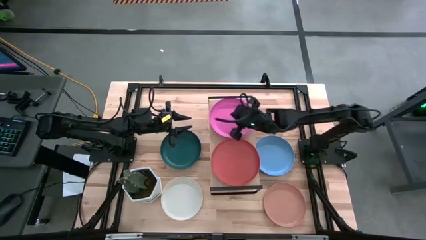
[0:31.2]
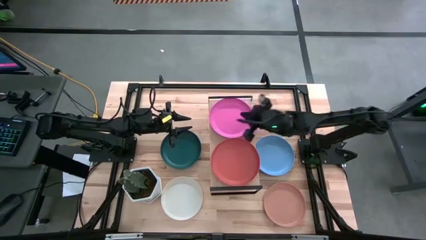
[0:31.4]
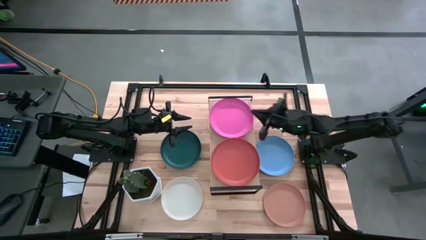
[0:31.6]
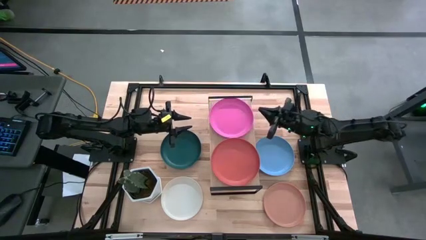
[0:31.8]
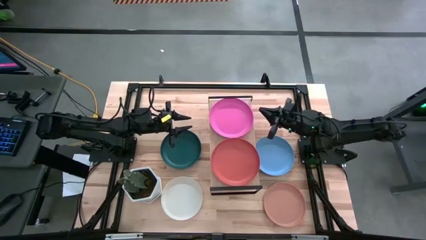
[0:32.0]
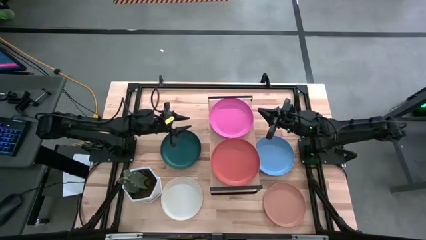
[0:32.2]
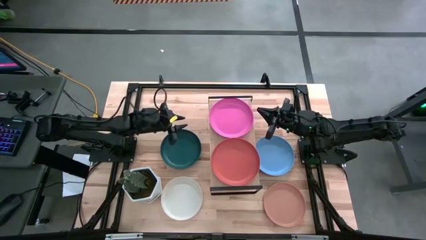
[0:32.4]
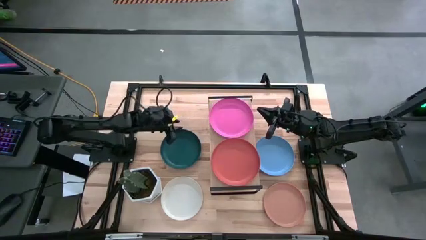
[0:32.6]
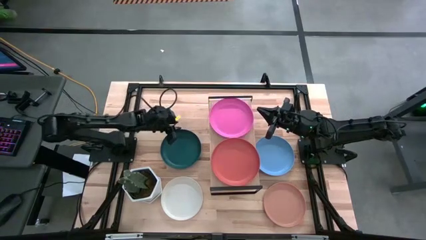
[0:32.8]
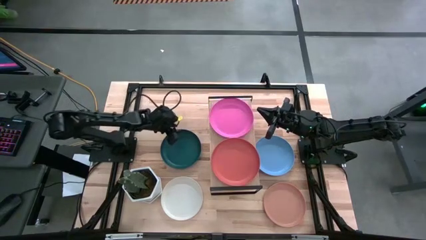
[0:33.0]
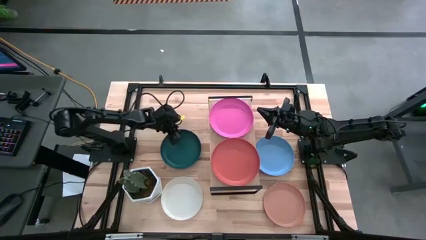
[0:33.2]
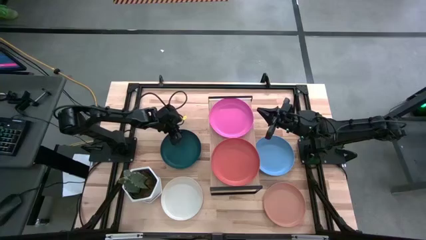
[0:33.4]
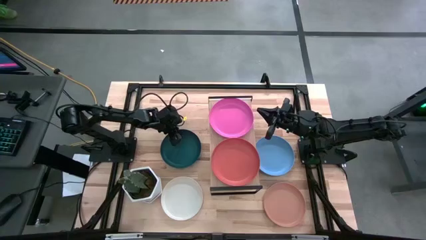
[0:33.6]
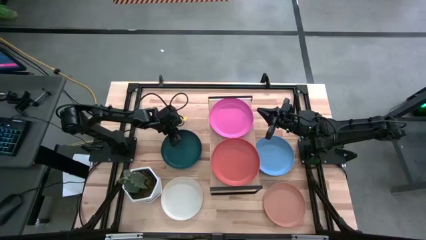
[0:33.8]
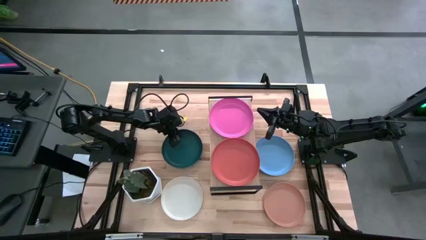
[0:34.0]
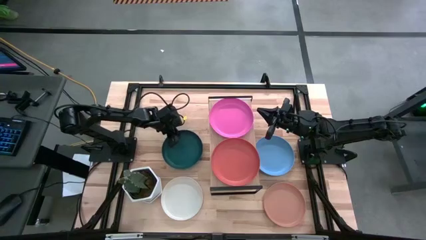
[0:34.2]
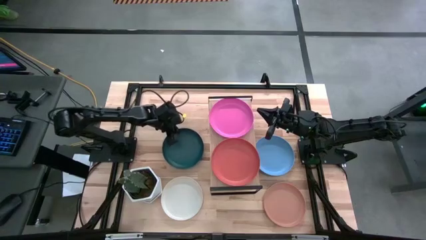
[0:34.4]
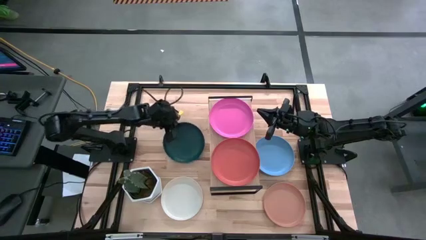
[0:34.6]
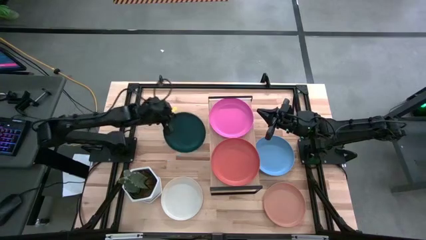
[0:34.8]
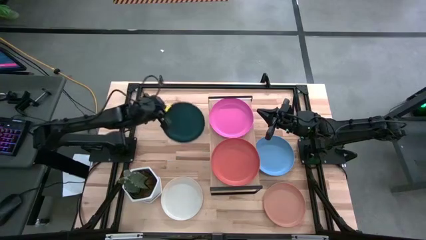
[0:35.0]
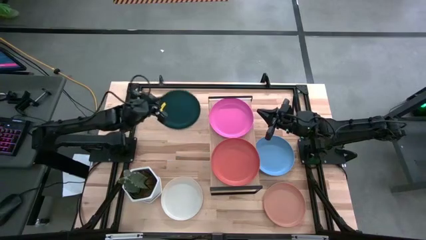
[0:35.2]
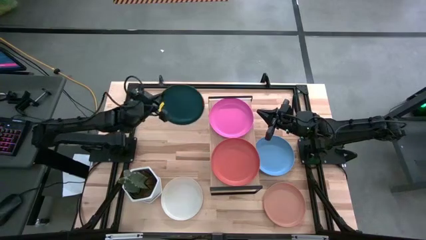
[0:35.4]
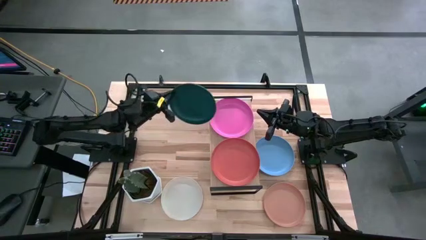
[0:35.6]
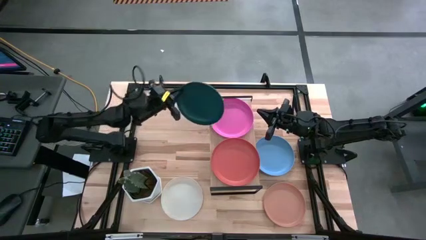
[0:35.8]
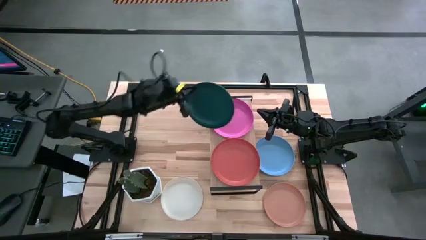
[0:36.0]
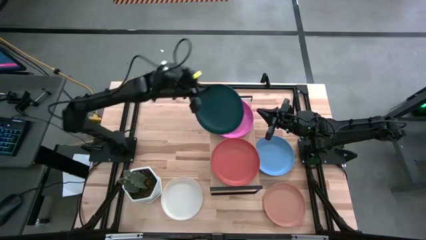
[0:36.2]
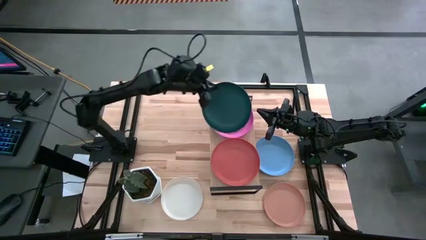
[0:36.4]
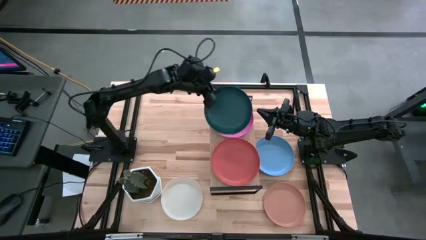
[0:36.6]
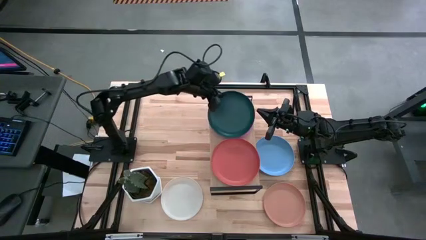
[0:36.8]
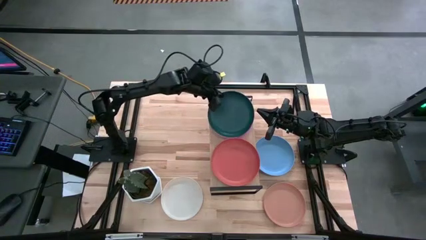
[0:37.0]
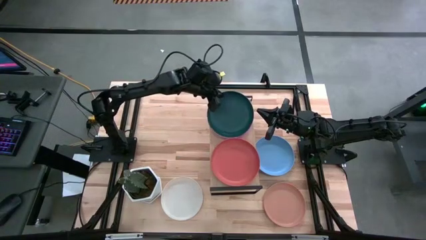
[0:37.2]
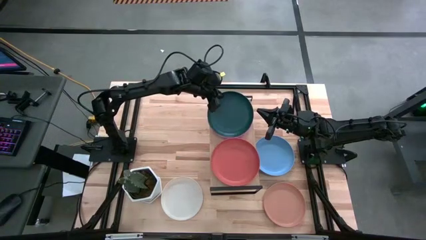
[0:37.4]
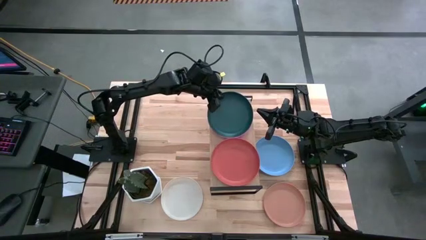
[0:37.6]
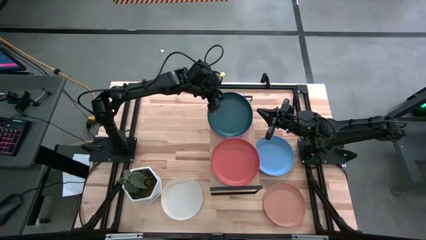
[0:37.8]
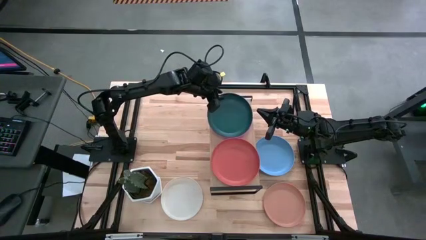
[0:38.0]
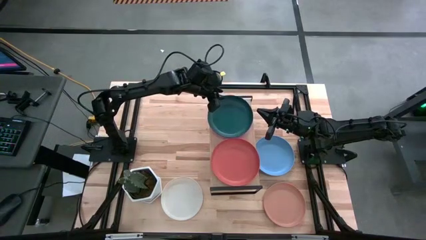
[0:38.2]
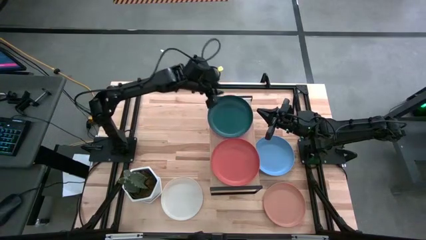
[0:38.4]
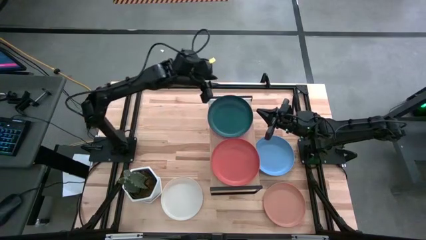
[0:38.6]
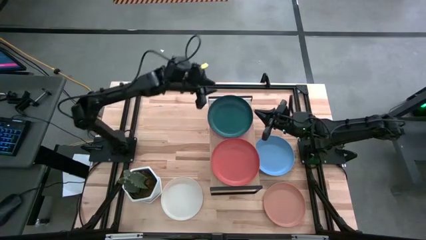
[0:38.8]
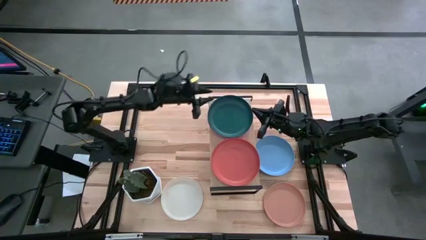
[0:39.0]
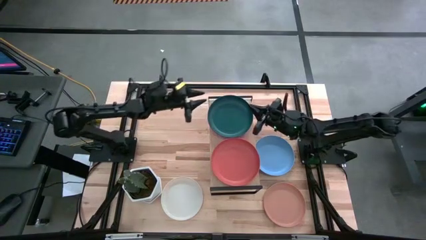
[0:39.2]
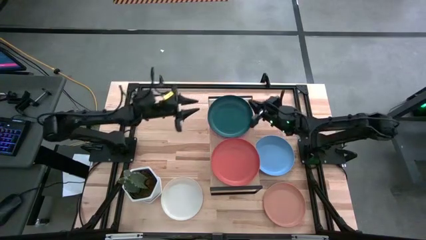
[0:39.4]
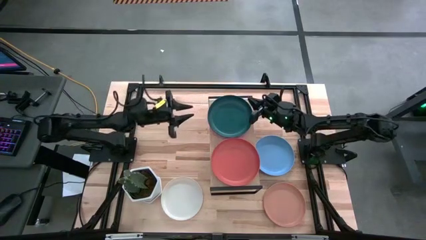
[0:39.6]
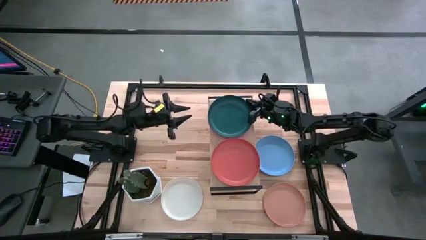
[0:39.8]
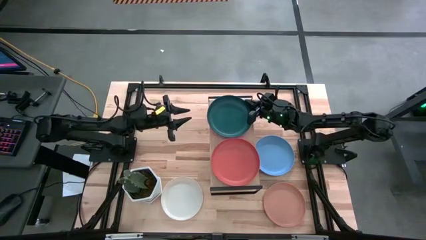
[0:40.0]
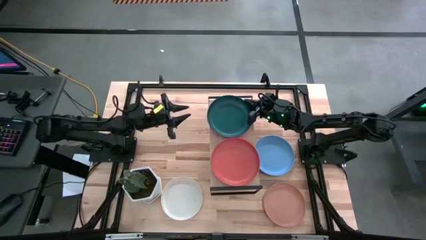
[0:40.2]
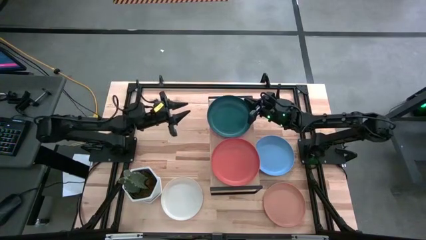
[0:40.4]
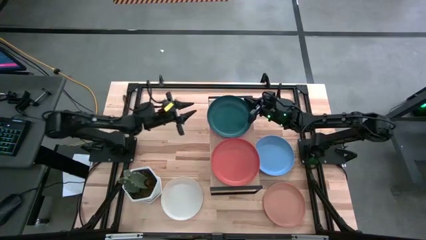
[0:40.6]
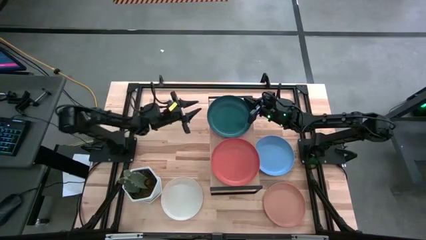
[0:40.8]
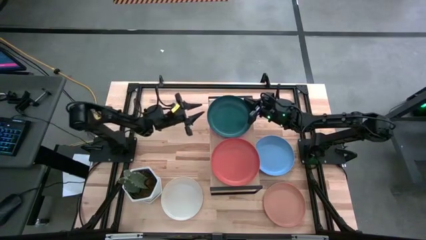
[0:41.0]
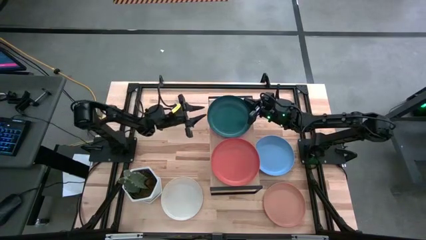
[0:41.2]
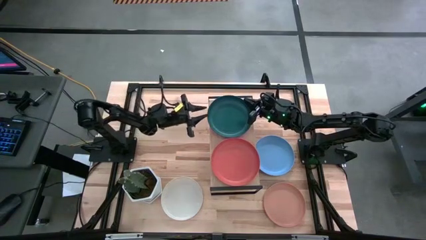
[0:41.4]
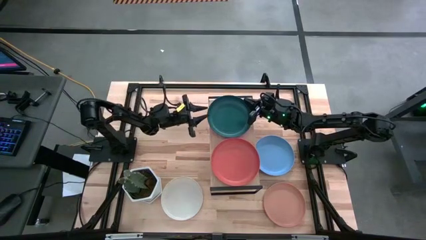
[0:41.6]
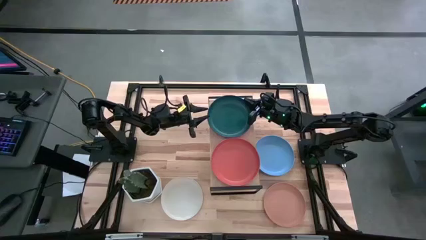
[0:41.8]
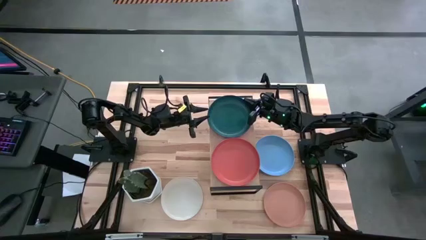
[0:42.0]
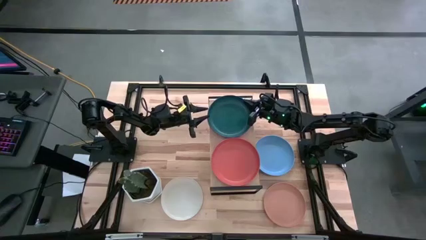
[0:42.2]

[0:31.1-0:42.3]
Task: Place and stack plates onto a shelf
Stack the green plate on top of the pink plate
